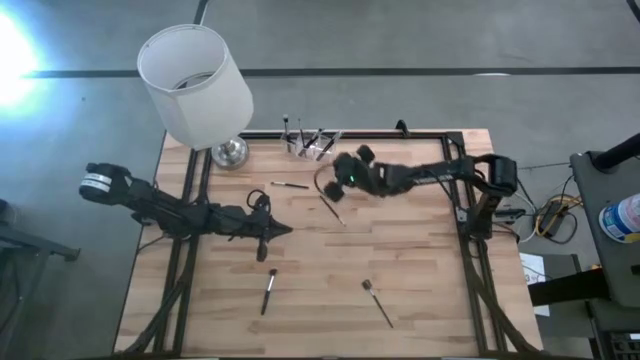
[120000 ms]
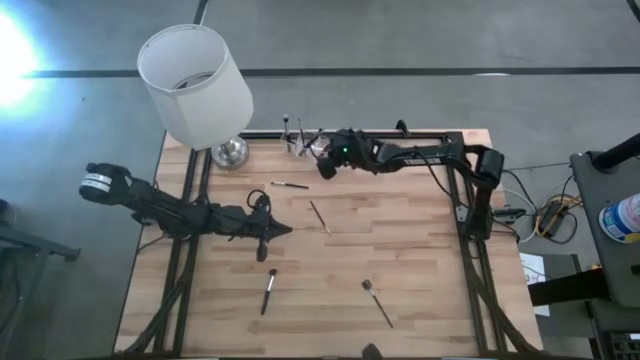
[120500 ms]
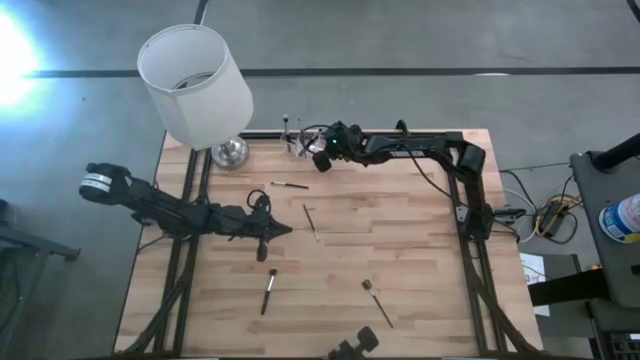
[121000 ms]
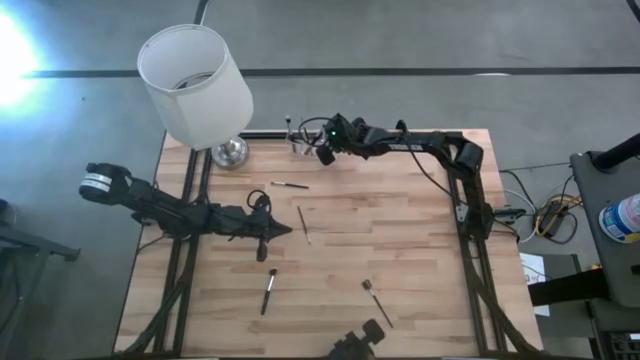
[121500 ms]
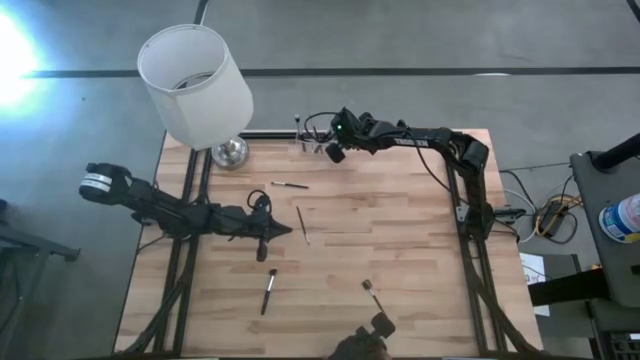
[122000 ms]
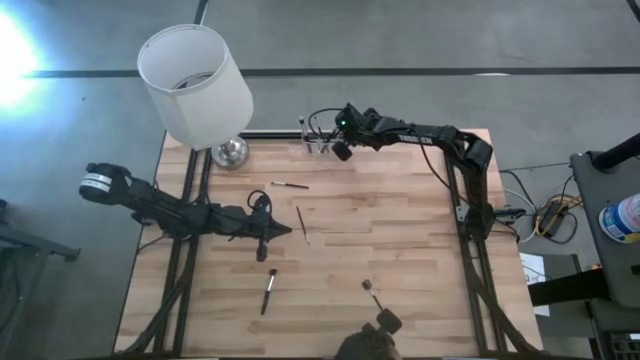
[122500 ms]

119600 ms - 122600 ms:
Task: Put items in baskets/containers
Adjust the transparent organizer

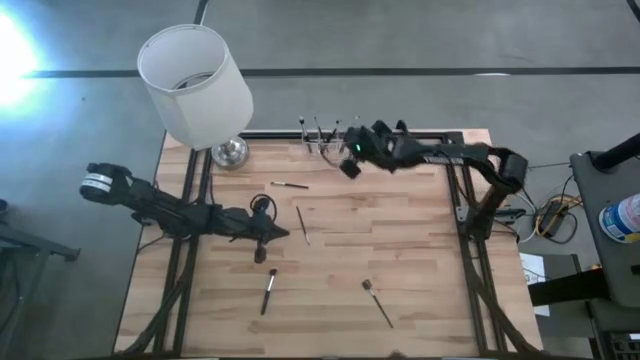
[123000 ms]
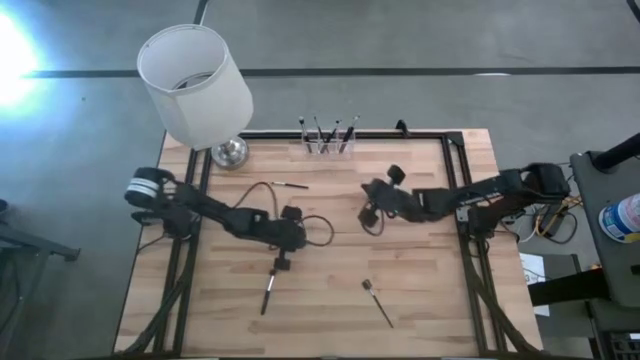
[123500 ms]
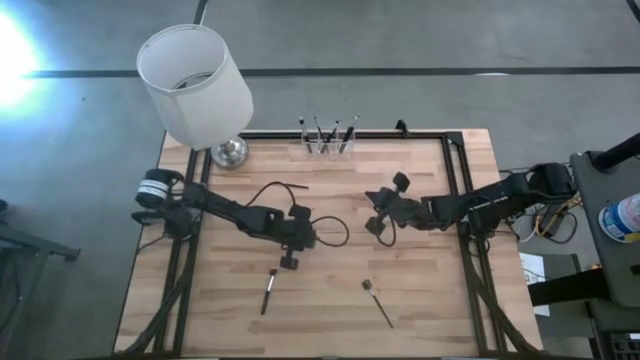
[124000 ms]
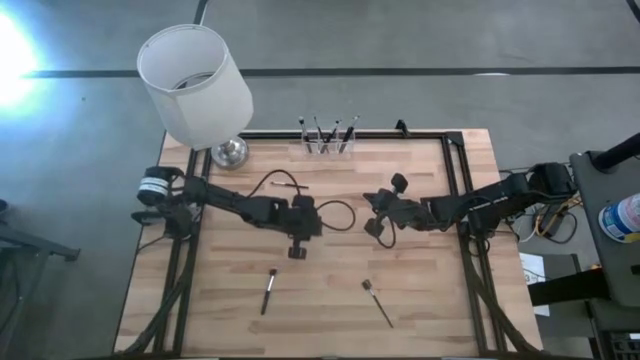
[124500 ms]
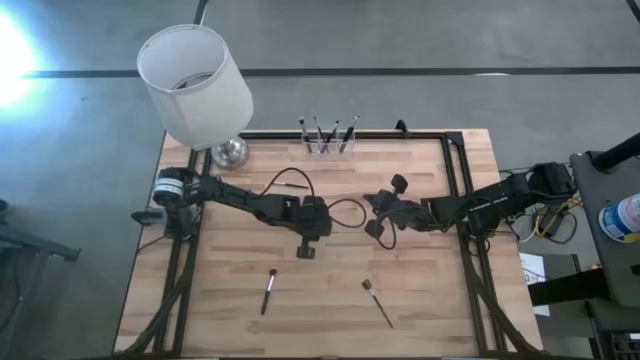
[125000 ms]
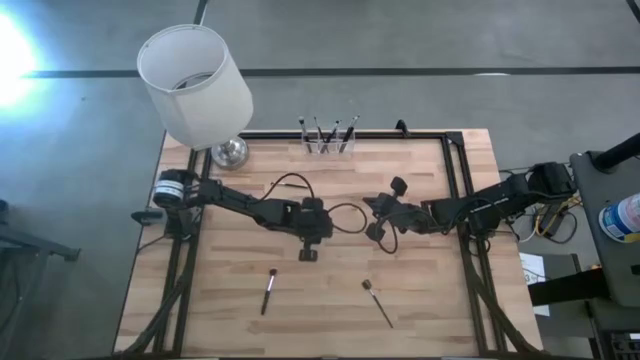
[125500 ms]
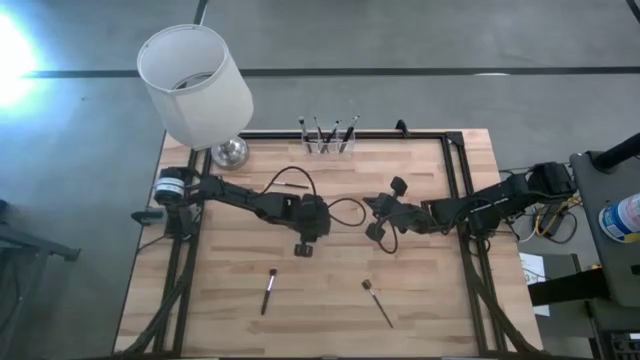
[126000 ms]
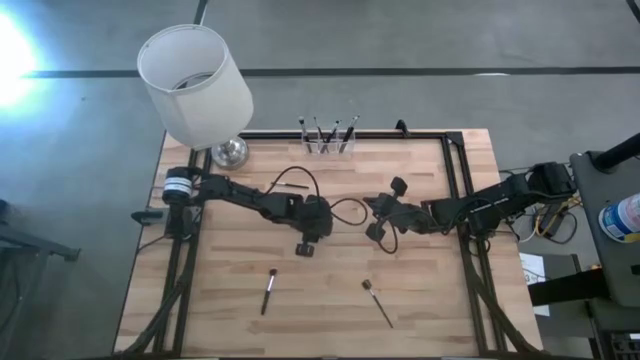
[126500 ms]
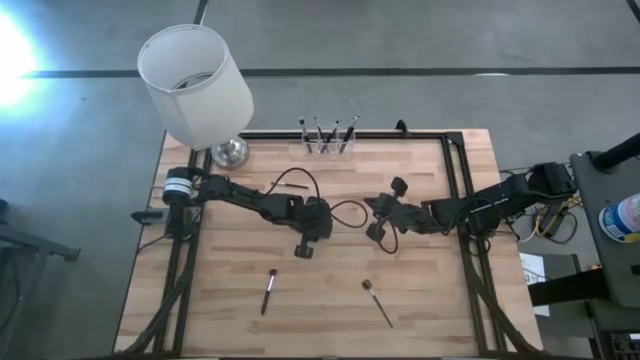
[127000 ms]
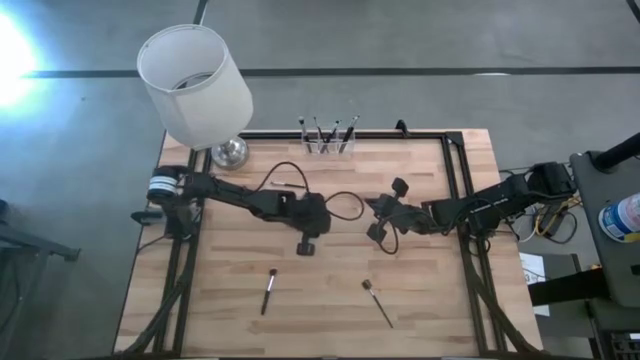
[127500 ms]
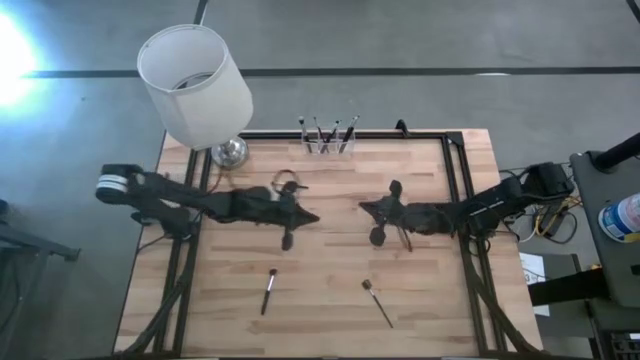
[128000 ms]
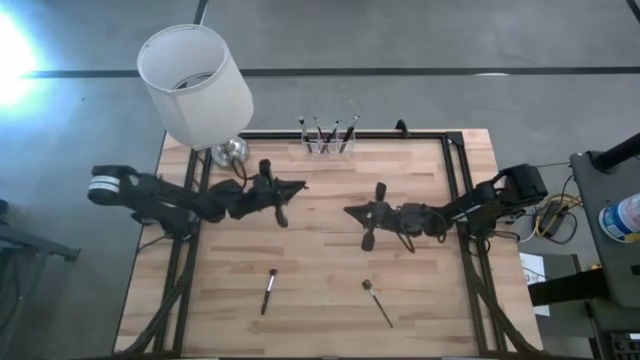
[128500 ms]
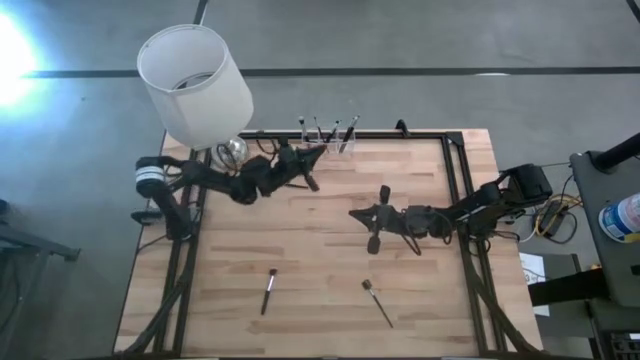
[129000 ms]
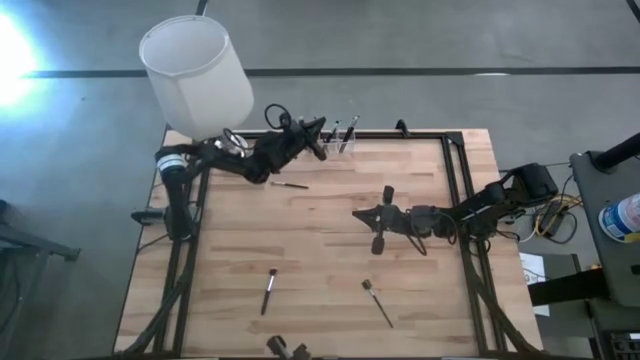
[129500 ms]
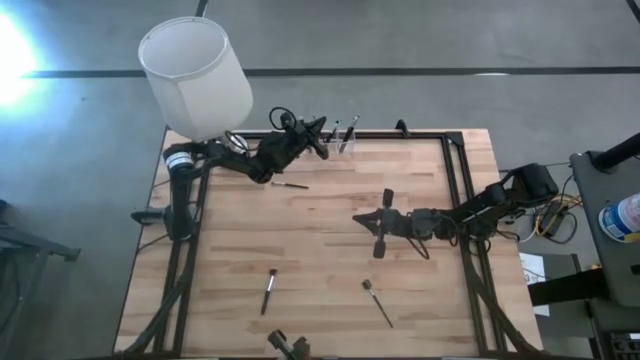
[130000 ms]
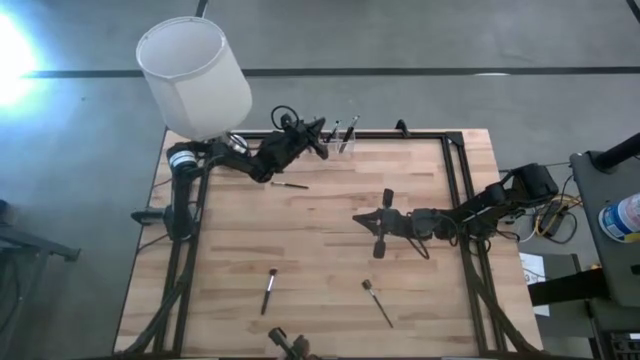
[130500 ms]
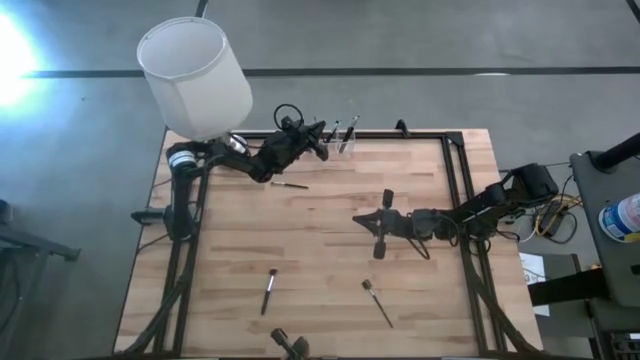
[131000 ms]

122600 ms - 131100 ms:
Put the eyeshadow brush into the transparent organizer

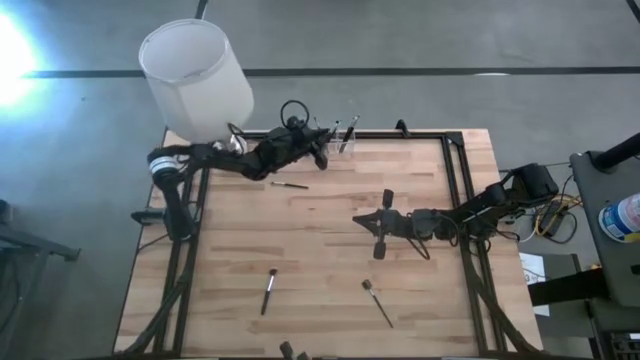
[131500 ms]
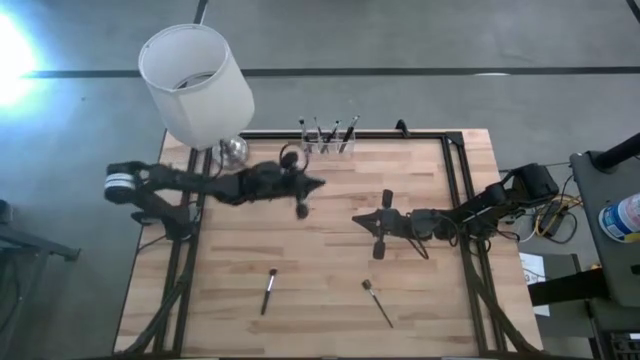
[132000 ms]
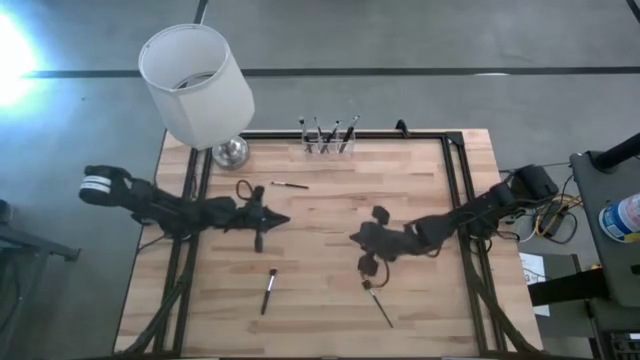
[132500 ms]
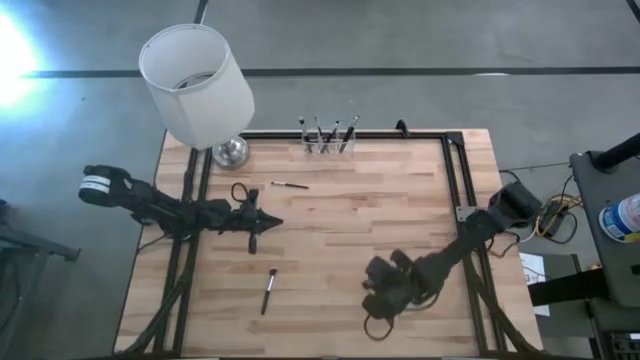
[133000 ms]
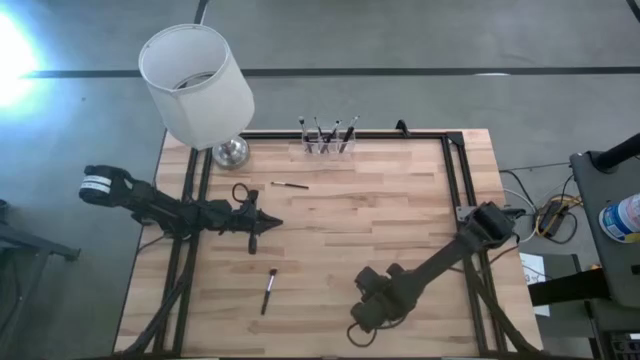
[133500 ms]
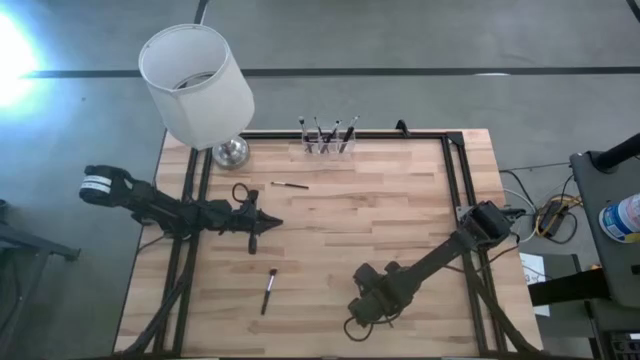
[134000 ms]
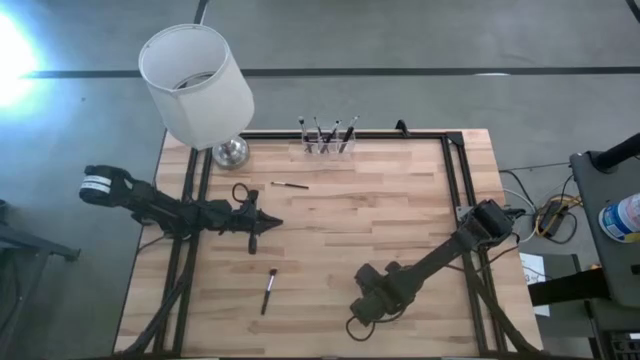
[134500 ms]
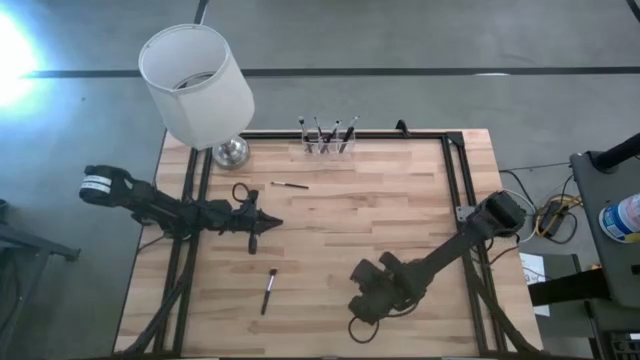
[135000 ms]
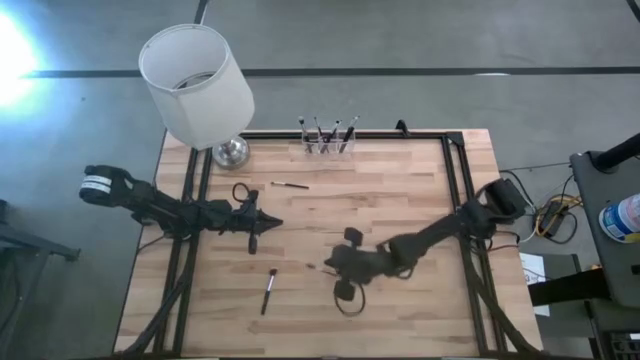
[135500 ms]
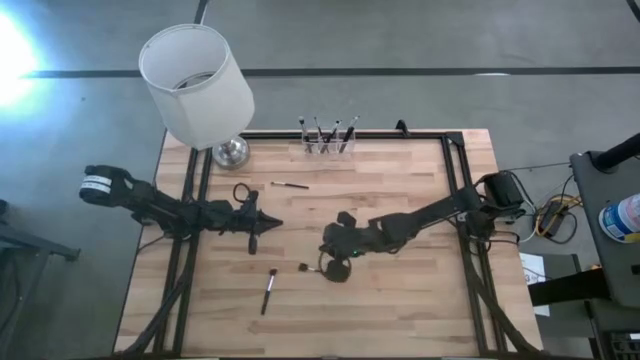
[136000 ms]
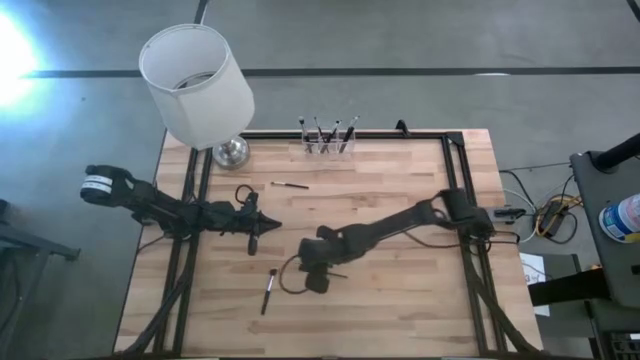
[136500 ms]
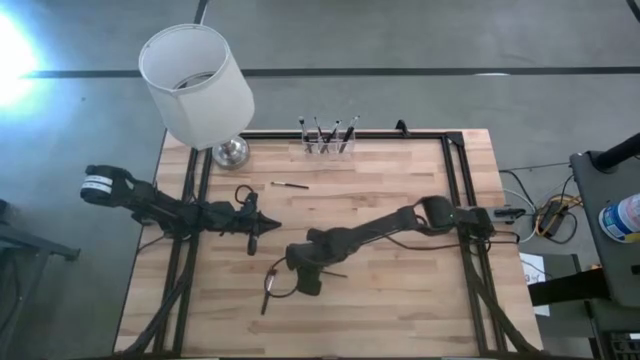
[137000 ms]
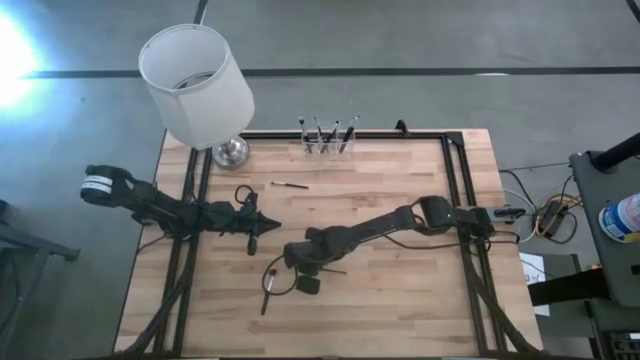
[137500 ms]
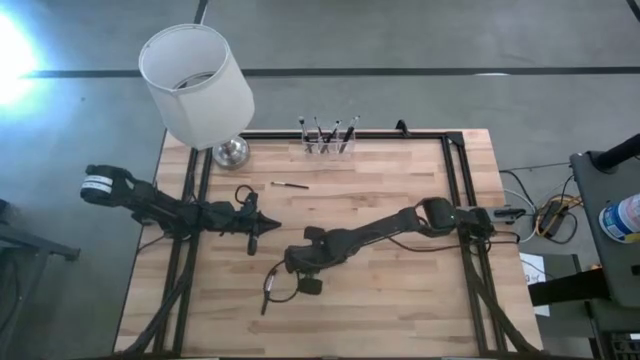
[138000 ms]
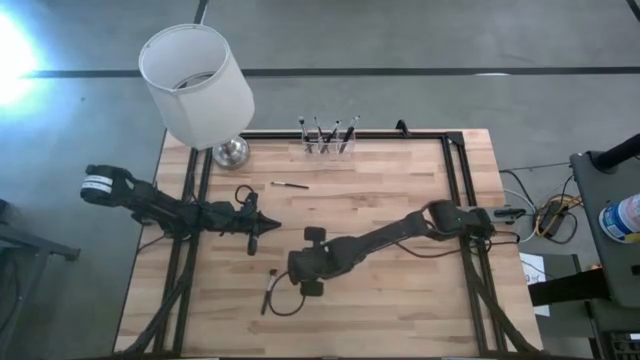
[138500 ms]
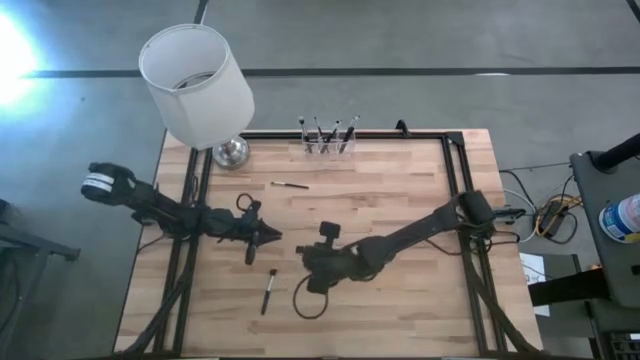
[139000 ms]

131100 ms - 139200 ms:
Put the eyeshadow brush into the transparent organizer

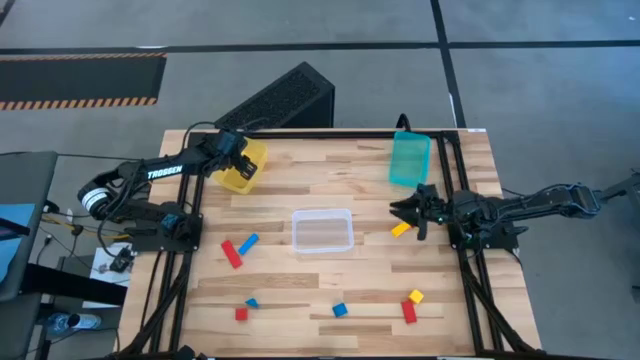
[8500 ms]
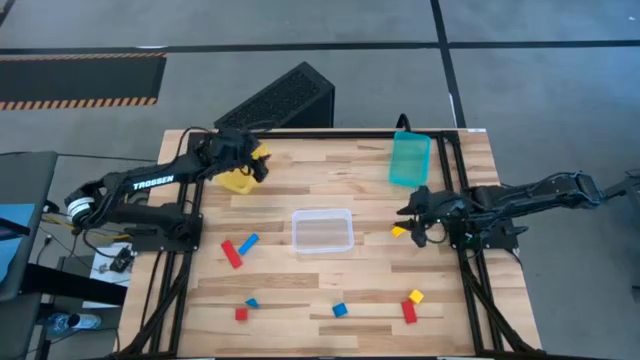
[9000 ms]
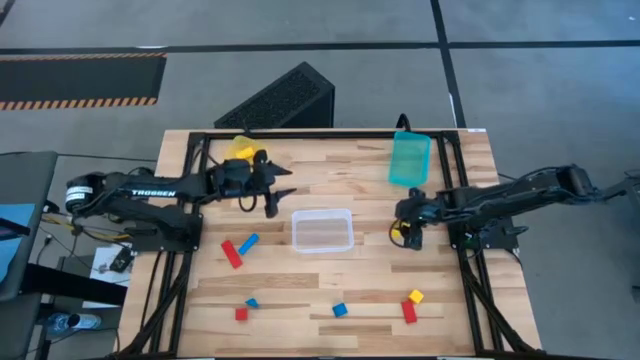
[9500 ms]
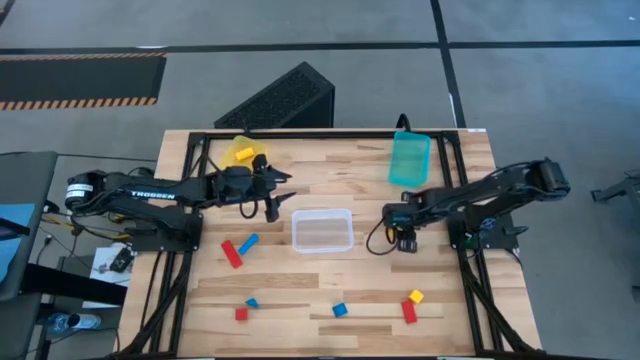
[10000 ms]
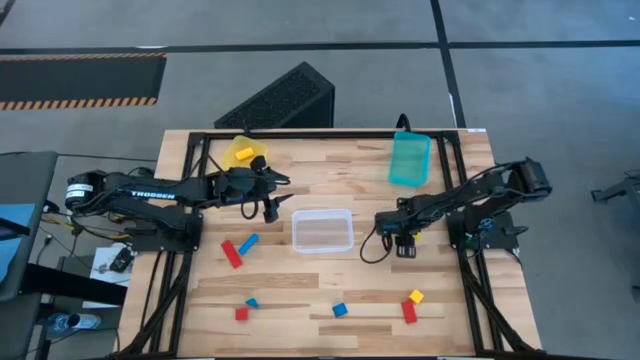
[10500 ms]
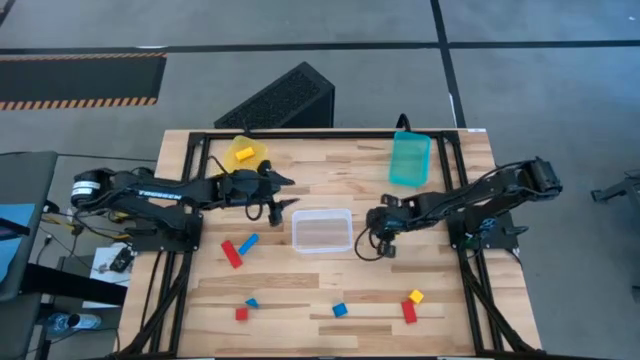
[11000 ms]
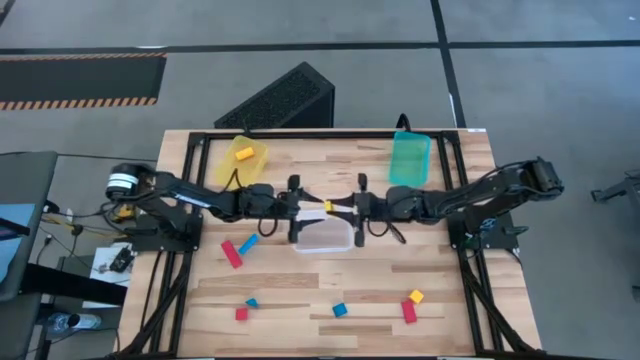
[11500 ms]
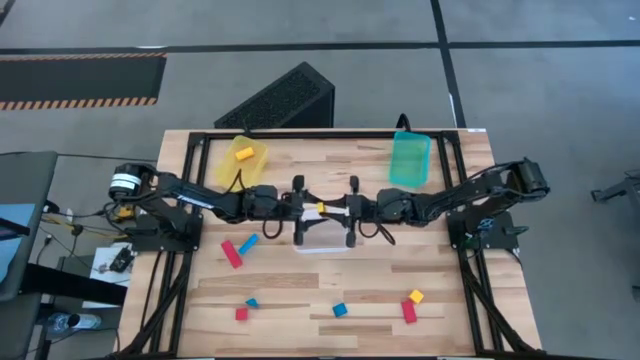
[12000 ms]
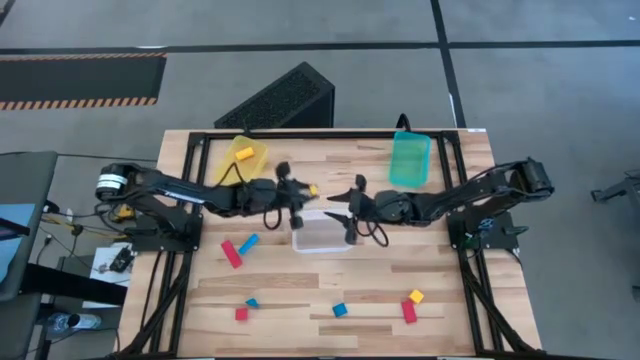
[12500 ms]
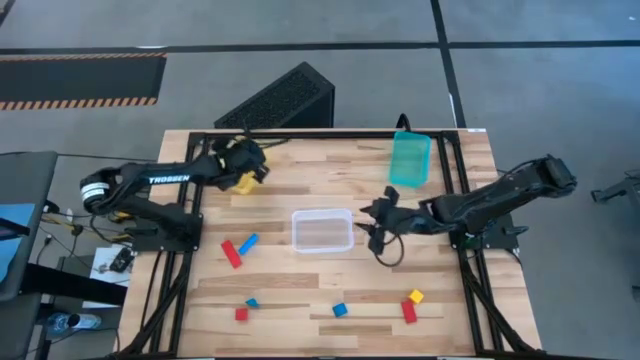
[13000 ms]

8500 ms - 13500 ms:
Task: Sort & place blocks by color
Put the top yellow block into the yellow bin
